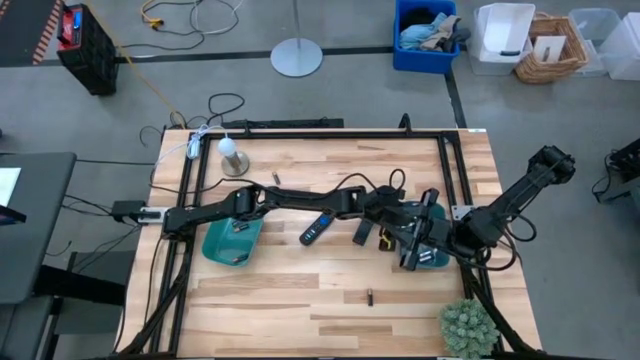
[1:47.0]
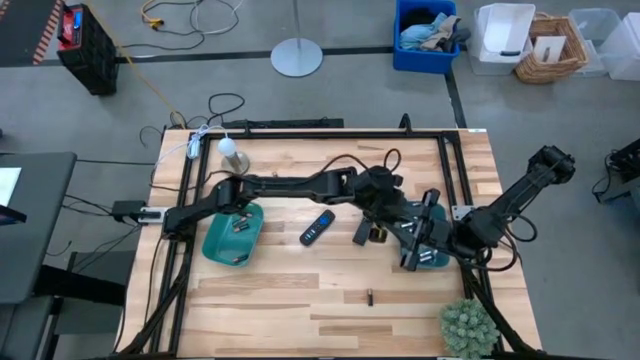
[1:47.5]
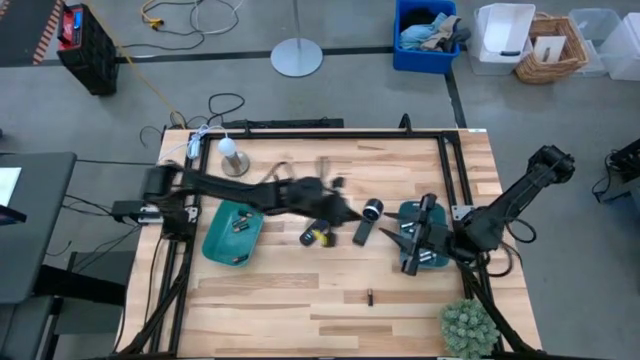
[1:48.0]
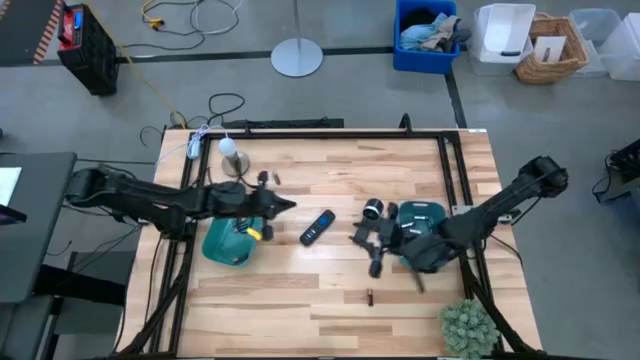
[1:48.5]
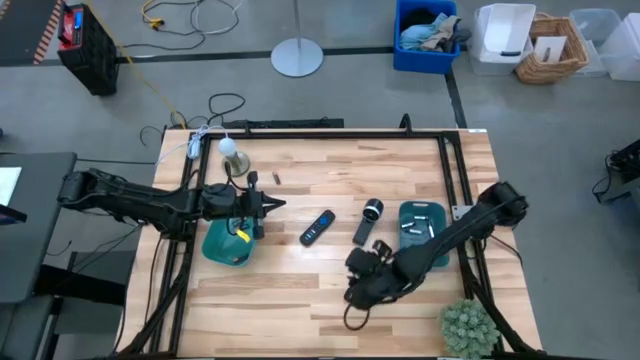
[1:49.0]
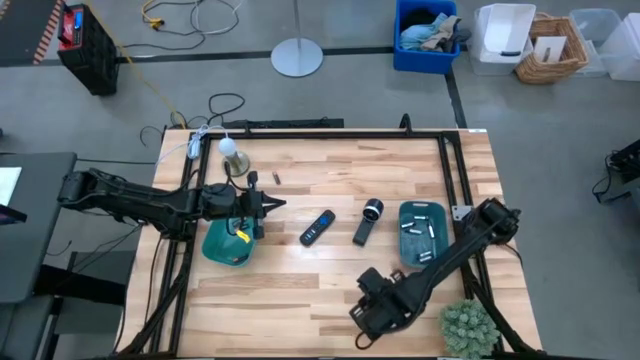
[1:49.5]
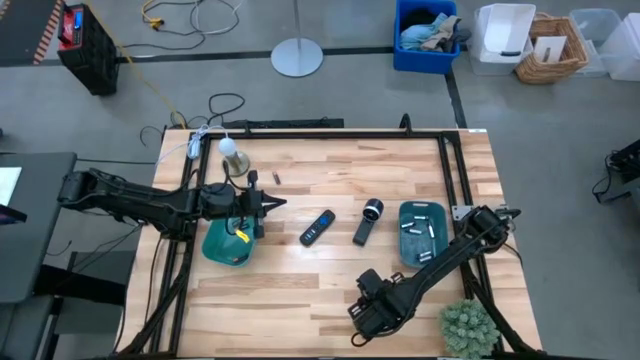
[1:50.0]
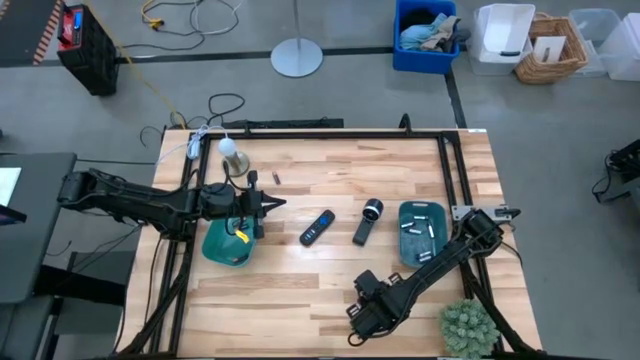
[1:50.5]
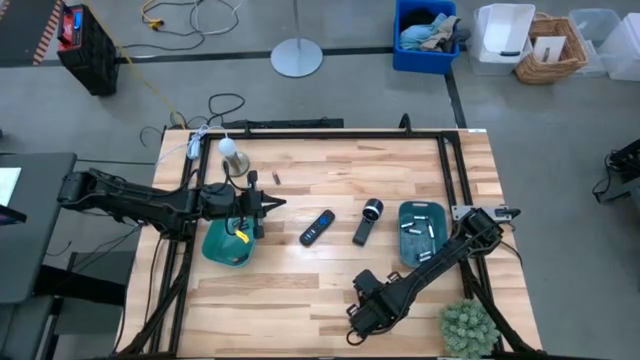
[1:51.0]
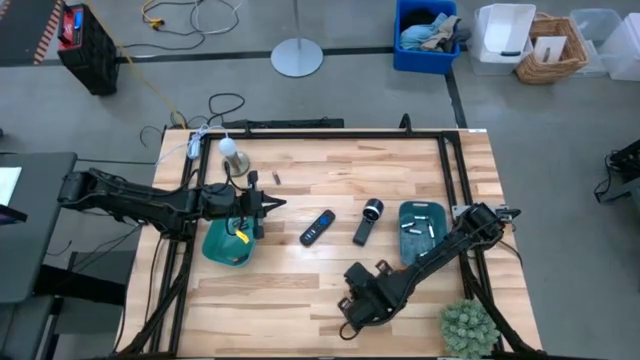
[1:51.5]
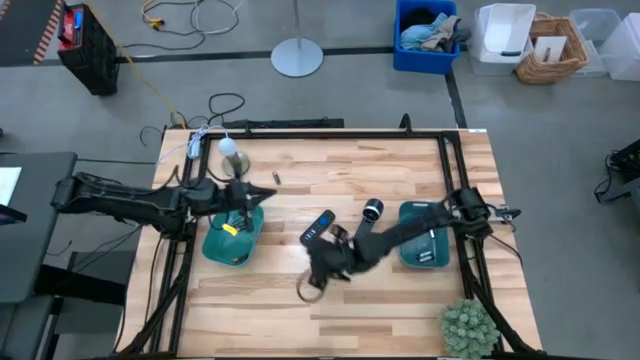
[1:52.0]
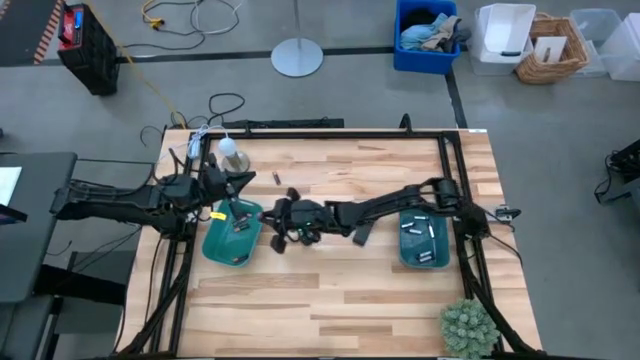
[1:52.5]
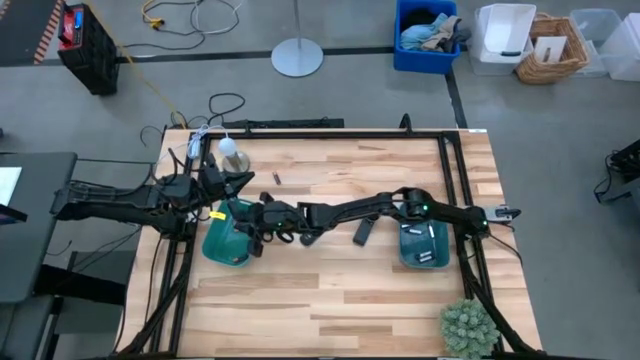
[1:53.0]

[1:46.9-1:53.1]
Task: Sort batteries
Put the brown battery into the green bin

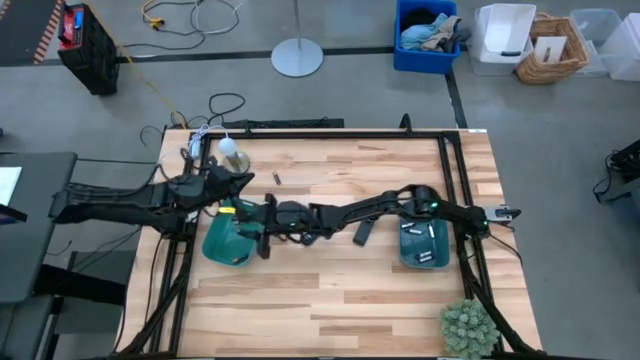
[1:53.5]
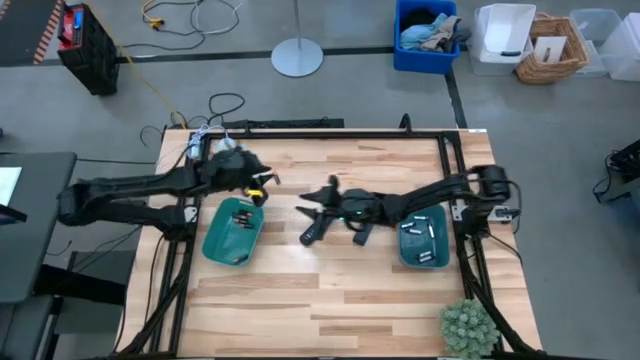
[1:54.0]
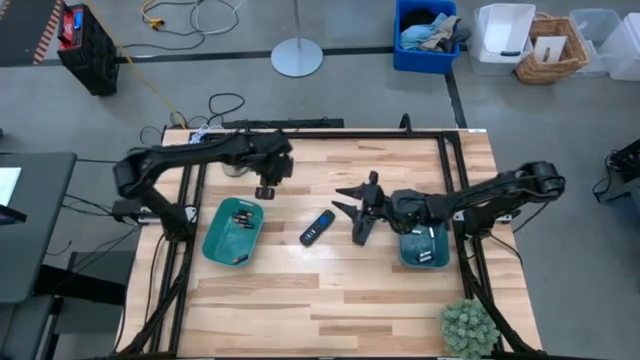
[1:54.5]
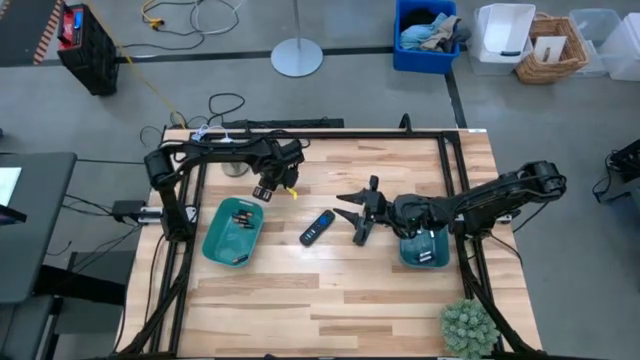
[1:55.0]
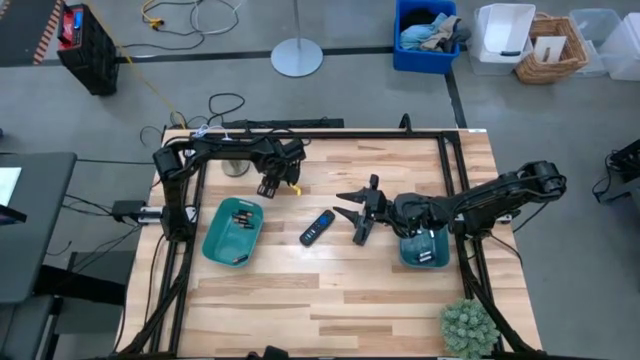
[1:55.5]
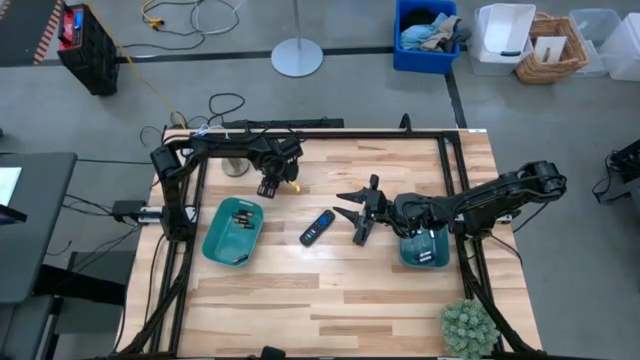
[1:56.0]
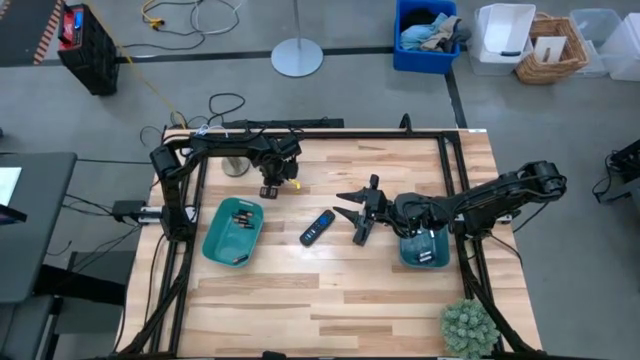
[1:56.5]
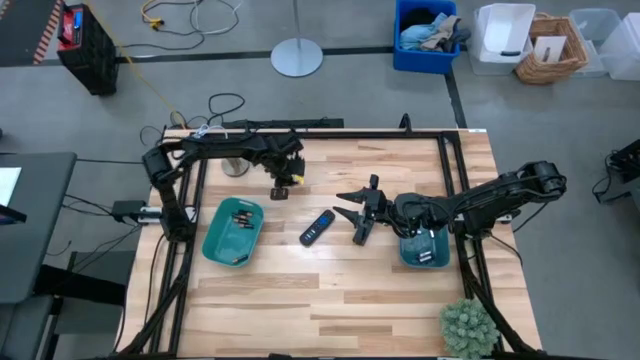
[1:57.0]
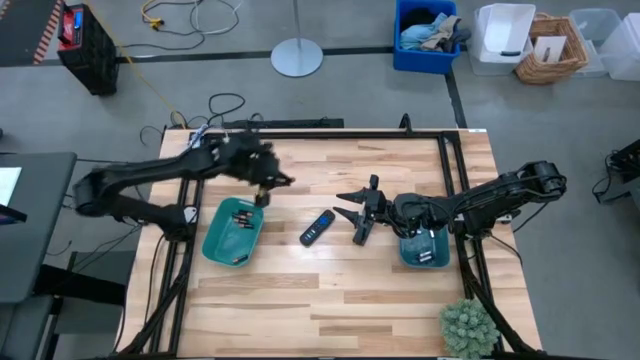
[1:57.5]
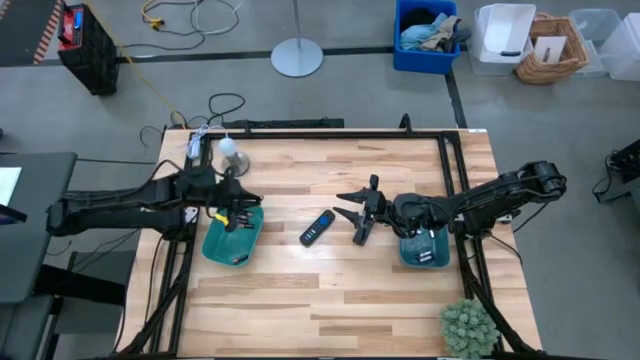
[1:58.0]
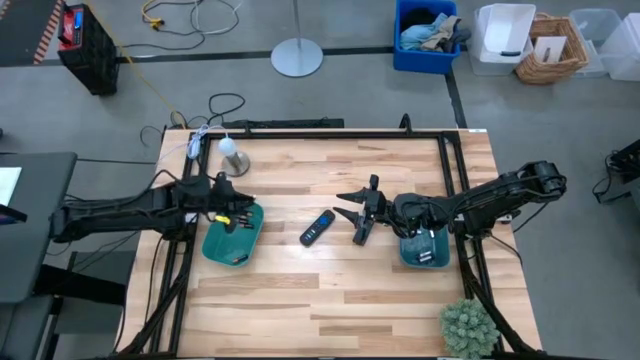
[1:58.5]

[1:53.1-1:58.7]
Put the brown battery into the green bin

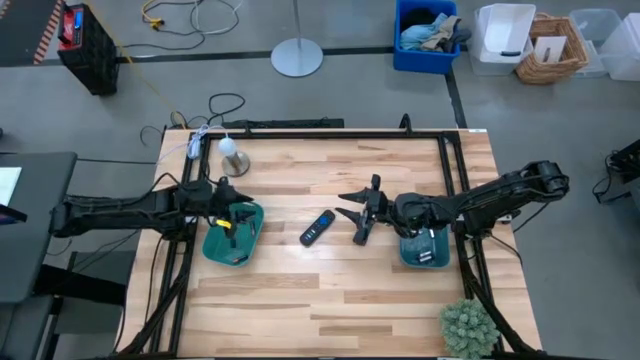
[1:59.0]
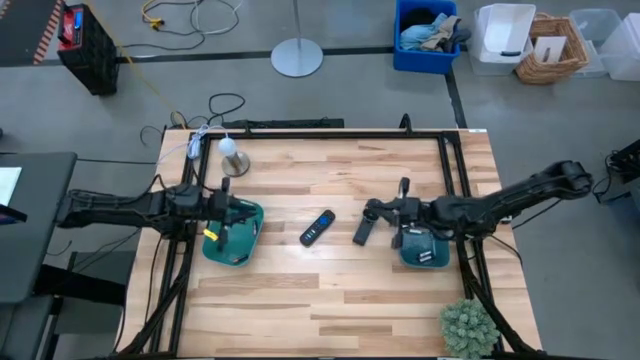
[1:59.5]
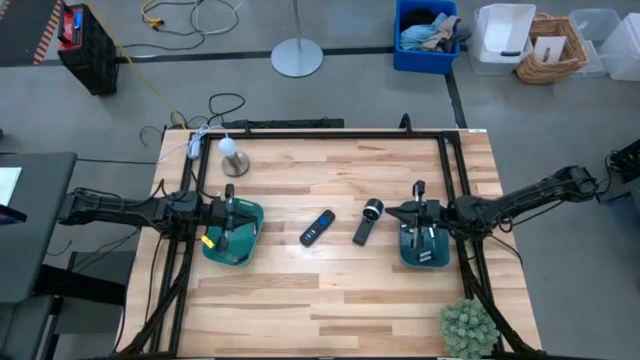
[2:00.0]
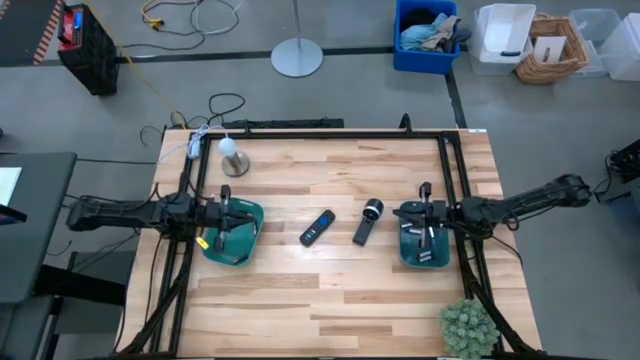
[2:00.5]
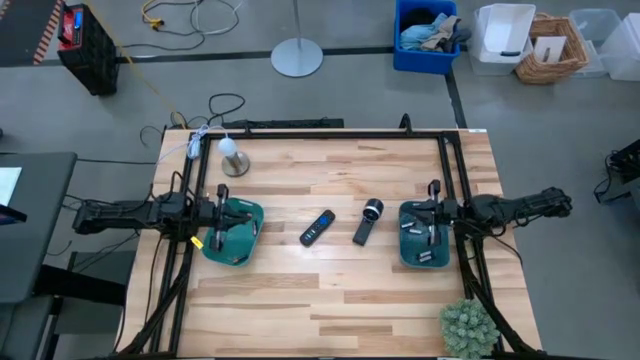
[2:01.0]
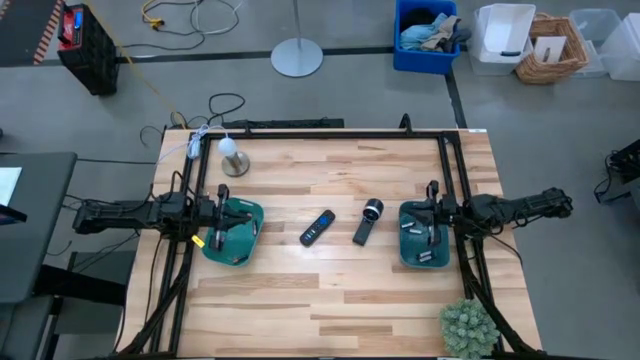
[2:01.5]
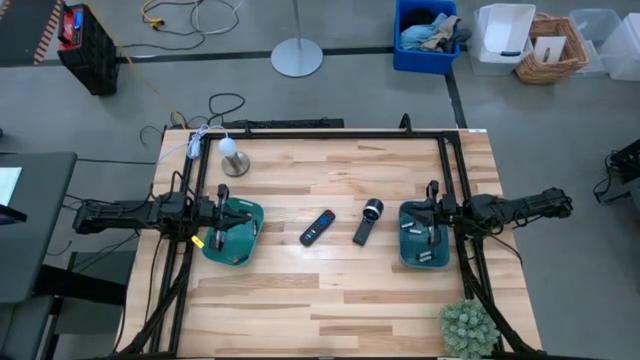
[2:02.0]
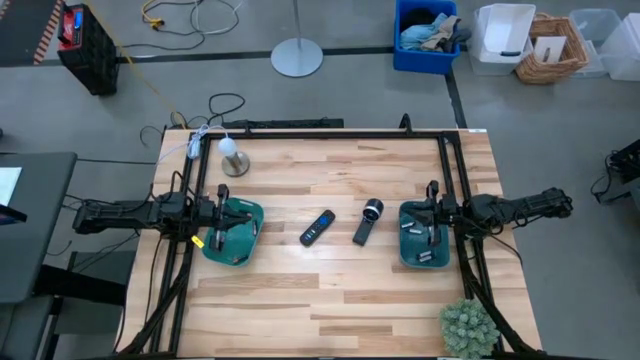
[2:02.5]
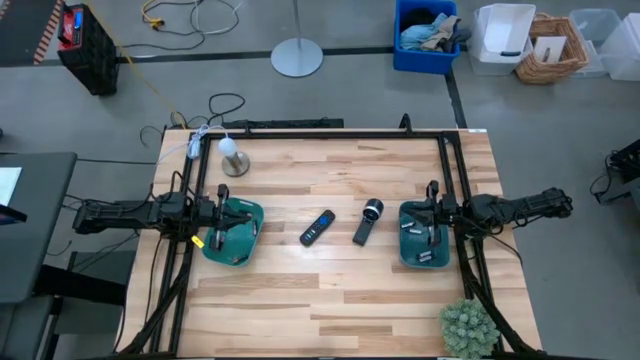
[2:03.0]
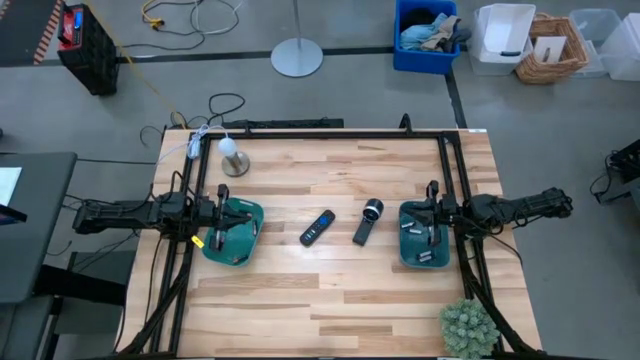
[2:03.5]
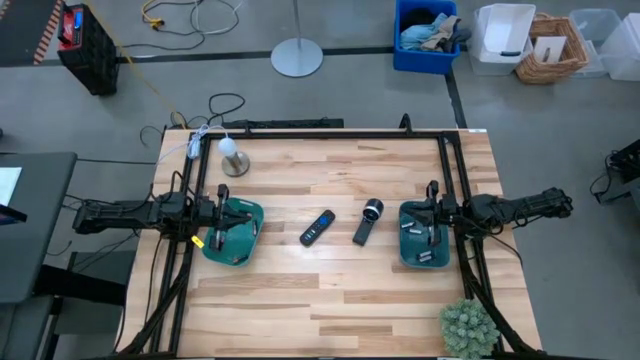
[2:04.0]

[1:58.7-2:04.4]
Return to Home Position

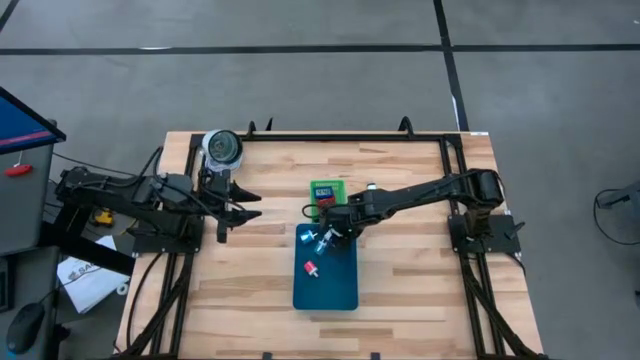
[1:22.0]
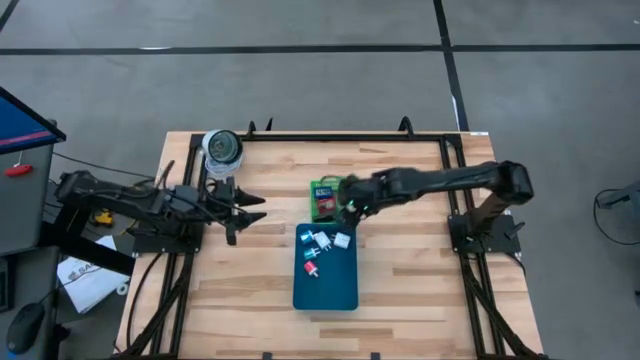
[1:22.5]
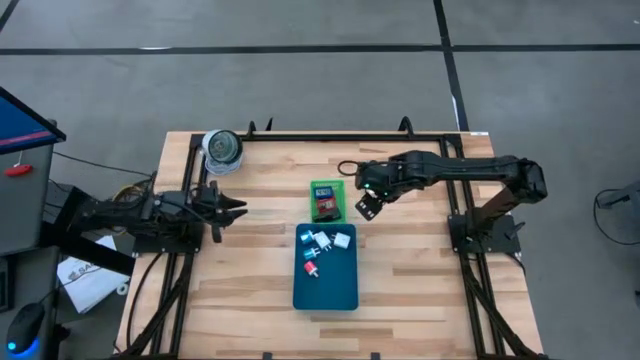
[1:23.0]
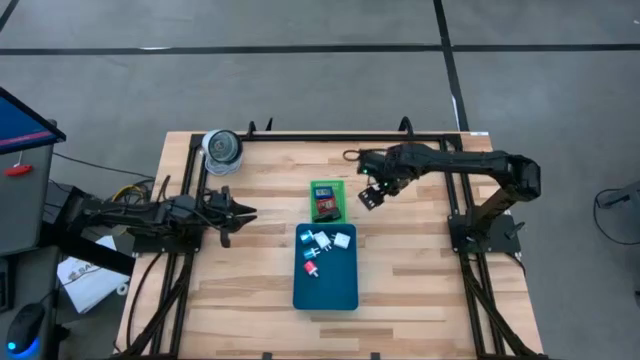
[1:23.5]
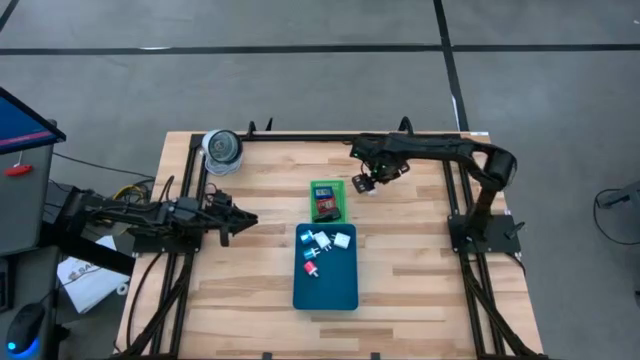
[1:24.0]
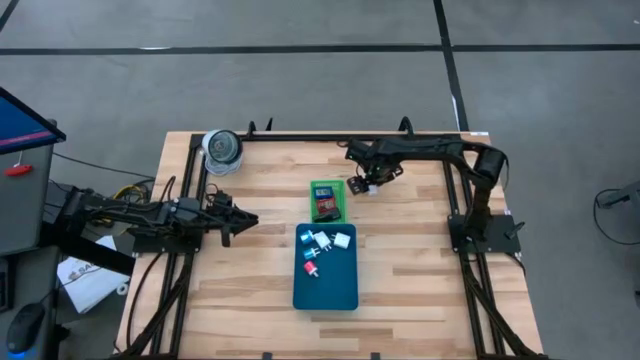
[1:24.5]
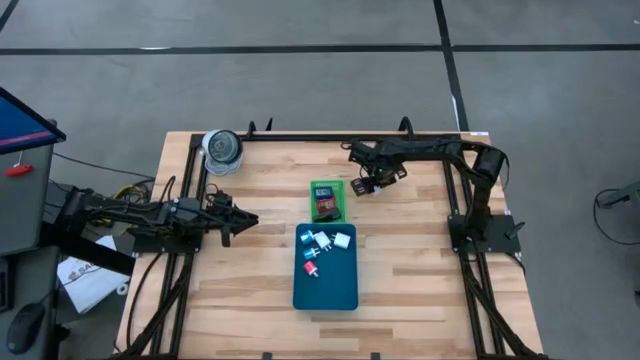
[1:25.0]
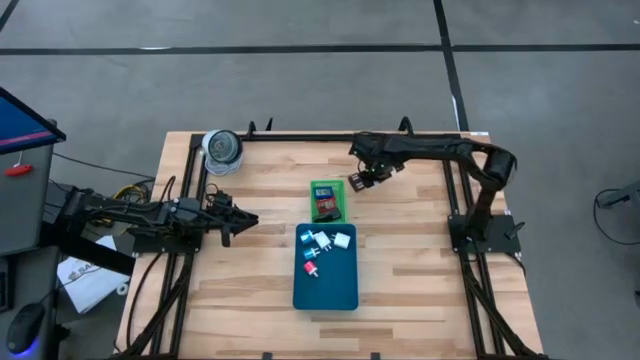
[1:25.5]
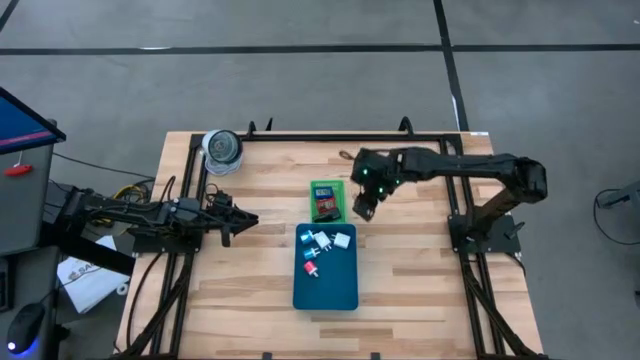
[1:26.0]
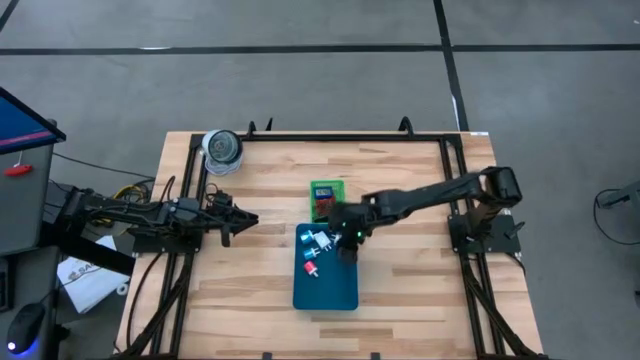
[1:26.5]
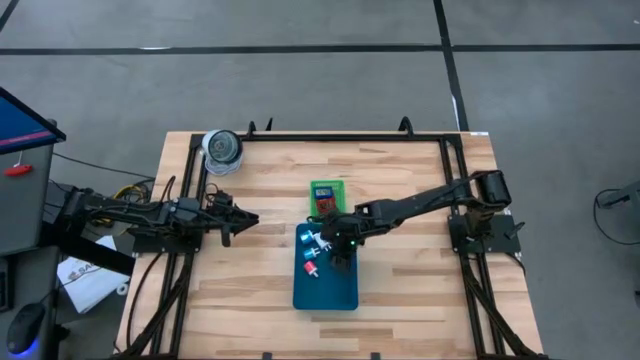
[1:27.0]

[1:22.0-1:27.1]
Task: Pick & Place Office items
Put the white charger adapter into the blue bin
